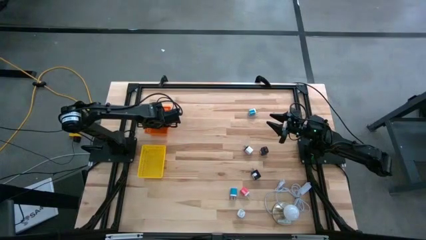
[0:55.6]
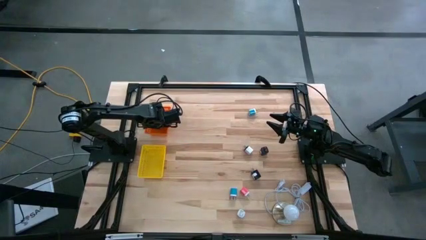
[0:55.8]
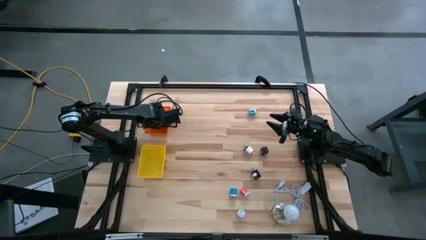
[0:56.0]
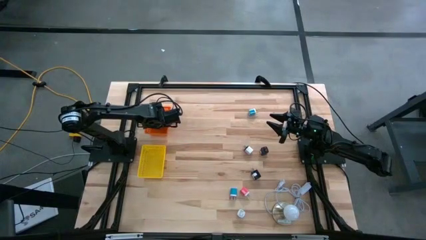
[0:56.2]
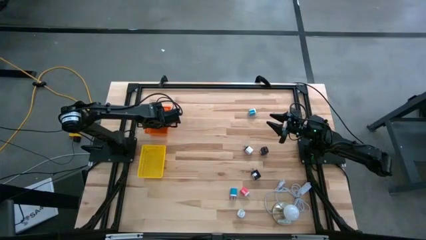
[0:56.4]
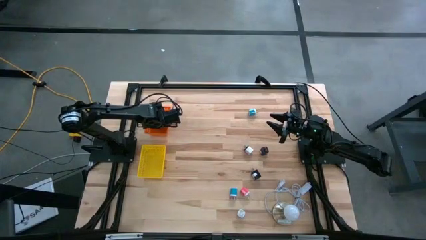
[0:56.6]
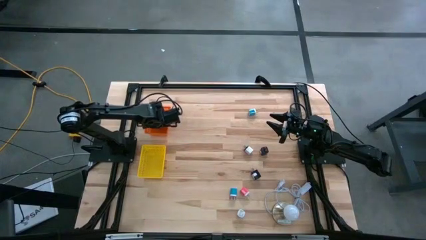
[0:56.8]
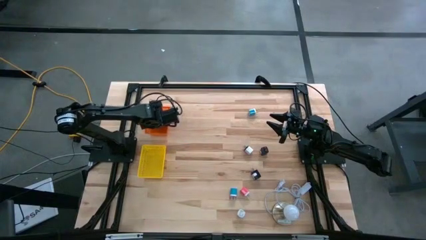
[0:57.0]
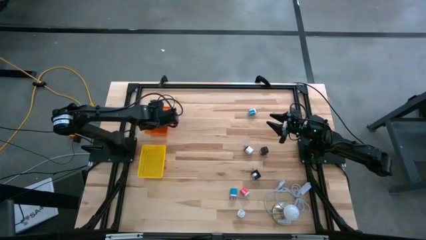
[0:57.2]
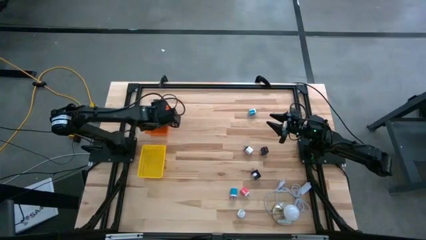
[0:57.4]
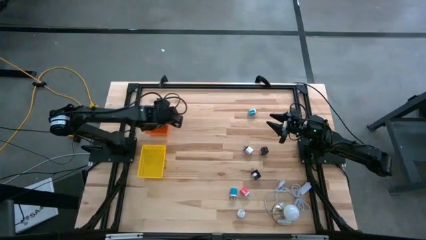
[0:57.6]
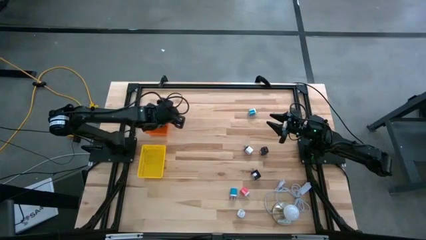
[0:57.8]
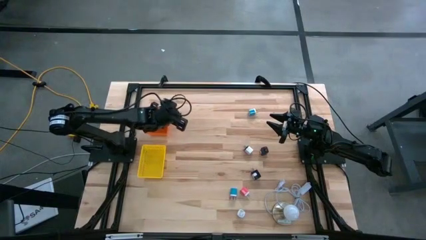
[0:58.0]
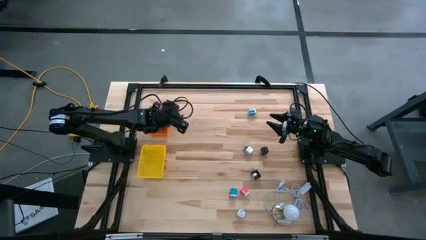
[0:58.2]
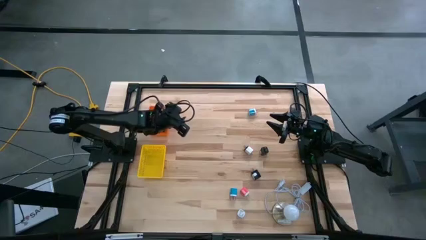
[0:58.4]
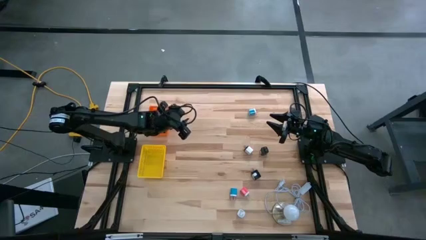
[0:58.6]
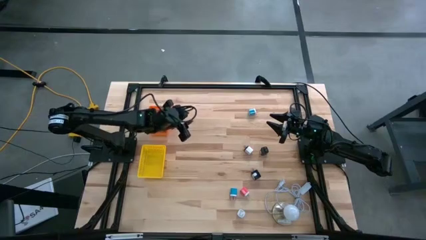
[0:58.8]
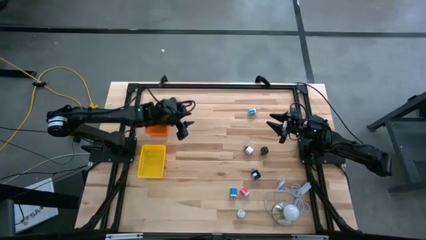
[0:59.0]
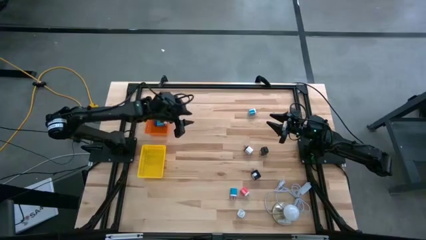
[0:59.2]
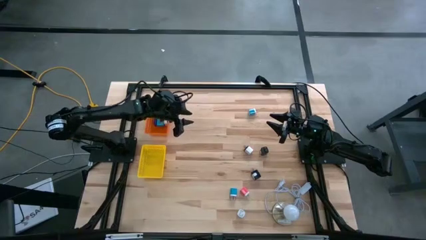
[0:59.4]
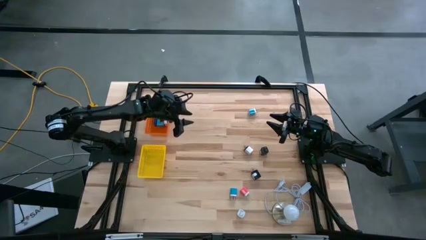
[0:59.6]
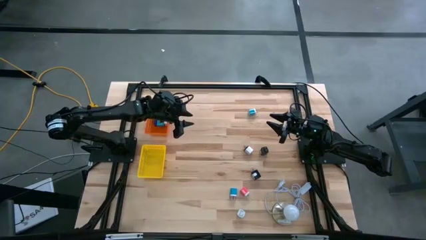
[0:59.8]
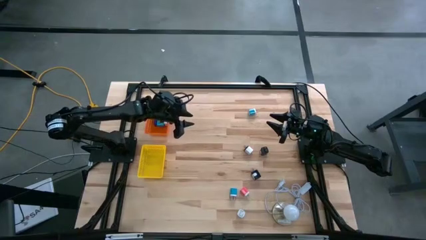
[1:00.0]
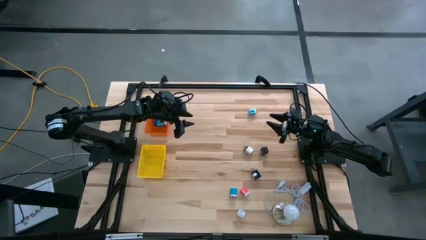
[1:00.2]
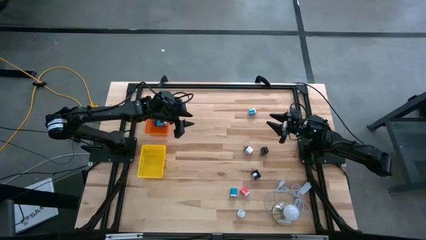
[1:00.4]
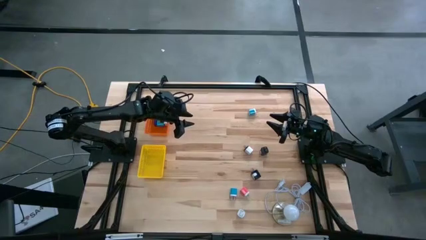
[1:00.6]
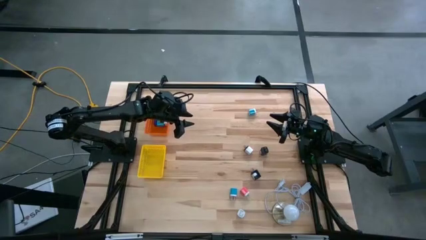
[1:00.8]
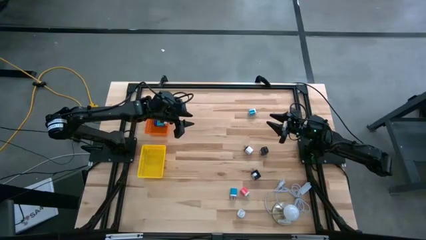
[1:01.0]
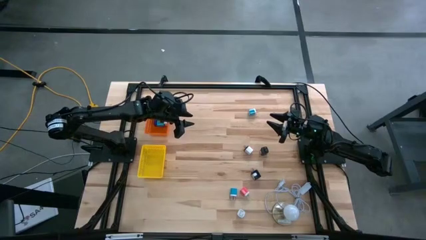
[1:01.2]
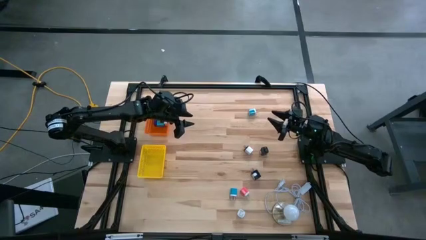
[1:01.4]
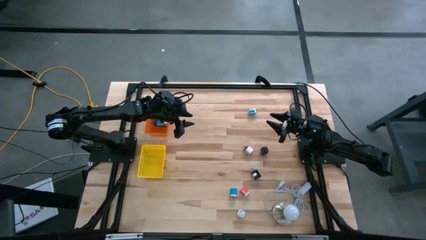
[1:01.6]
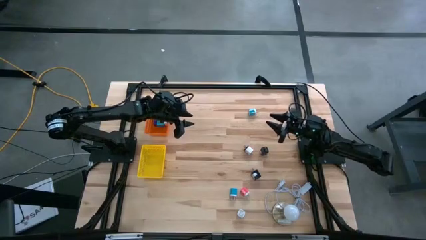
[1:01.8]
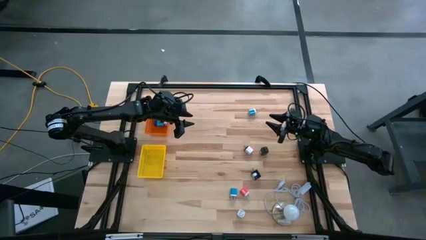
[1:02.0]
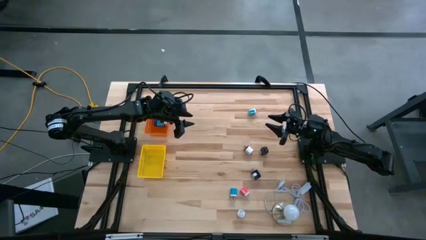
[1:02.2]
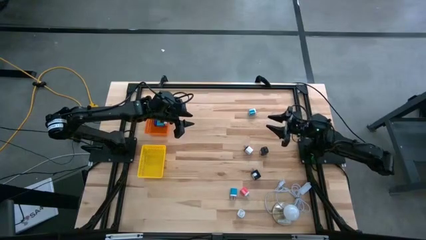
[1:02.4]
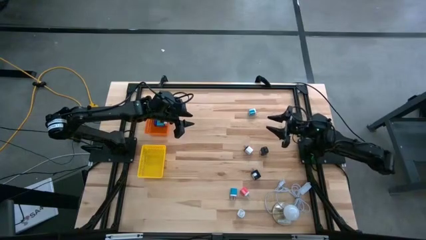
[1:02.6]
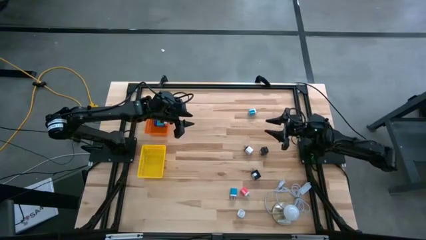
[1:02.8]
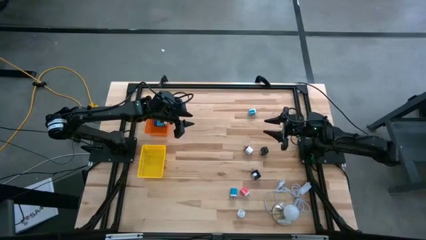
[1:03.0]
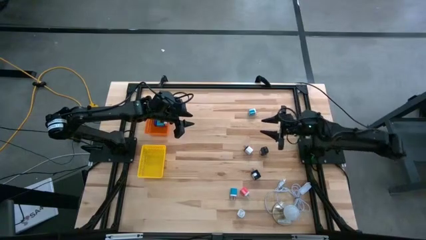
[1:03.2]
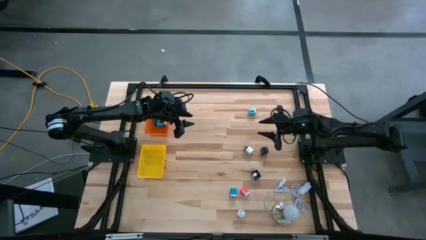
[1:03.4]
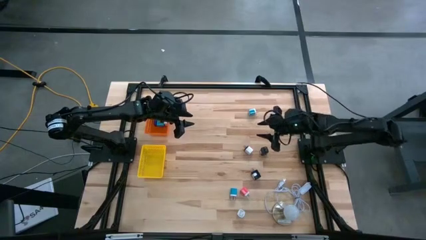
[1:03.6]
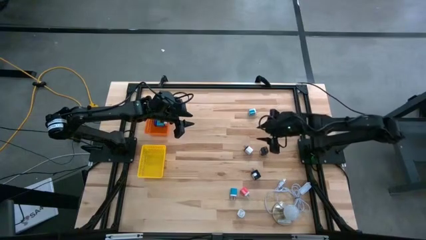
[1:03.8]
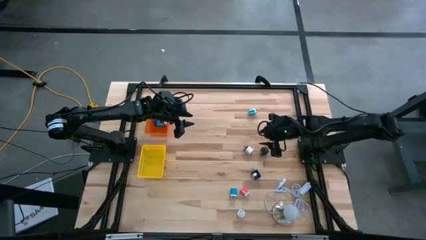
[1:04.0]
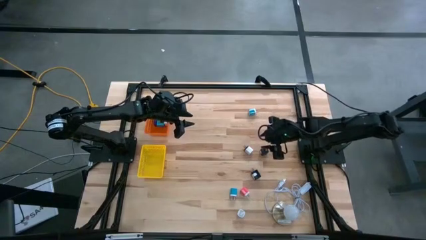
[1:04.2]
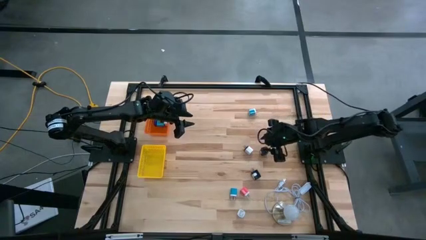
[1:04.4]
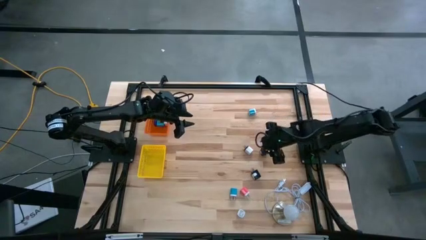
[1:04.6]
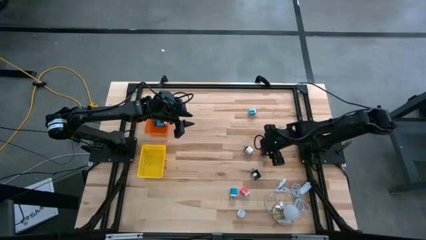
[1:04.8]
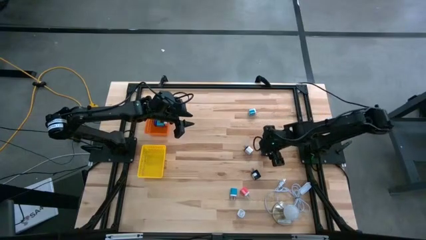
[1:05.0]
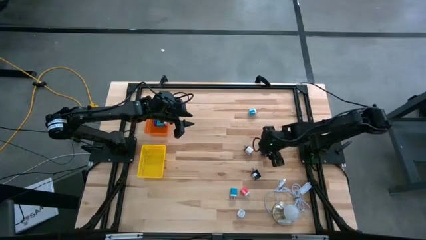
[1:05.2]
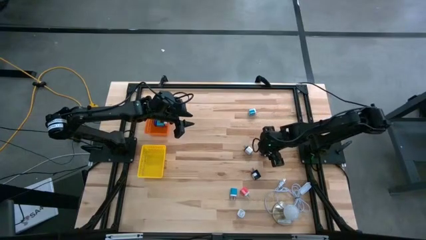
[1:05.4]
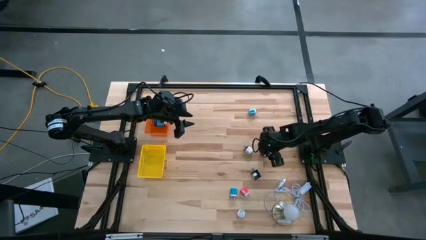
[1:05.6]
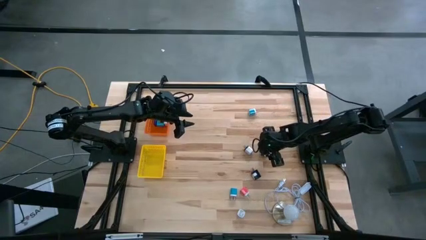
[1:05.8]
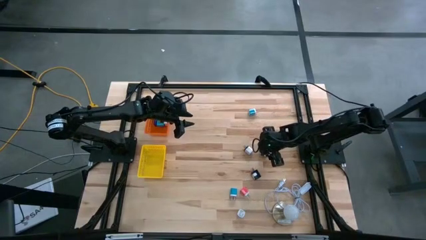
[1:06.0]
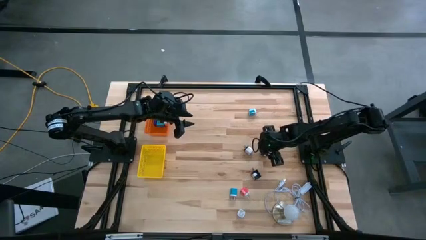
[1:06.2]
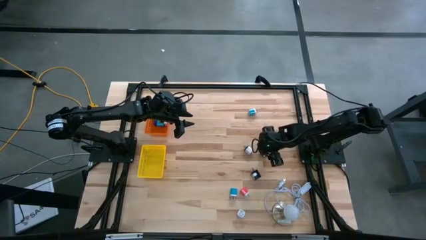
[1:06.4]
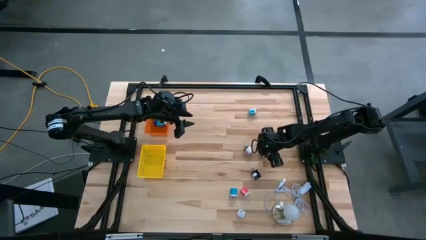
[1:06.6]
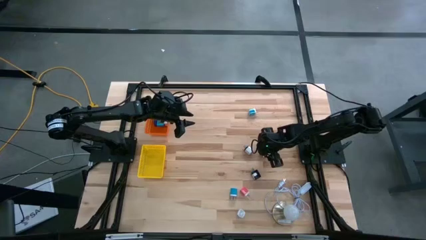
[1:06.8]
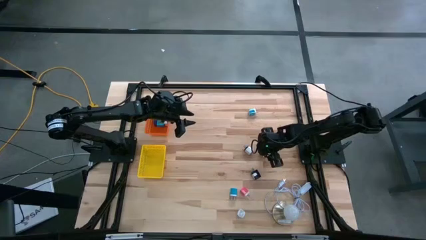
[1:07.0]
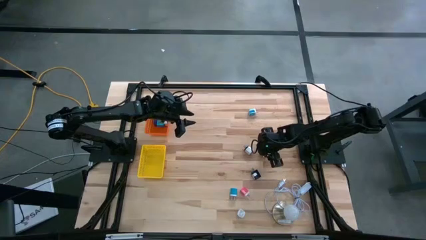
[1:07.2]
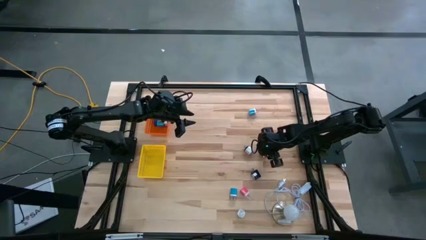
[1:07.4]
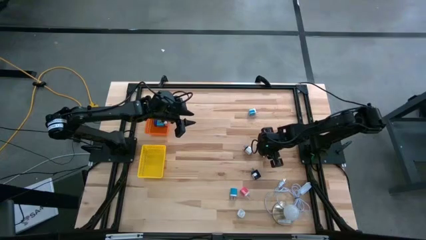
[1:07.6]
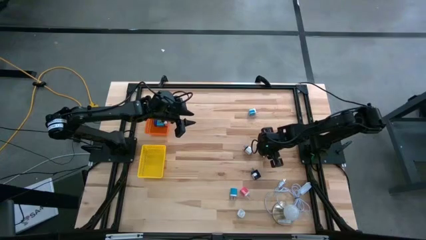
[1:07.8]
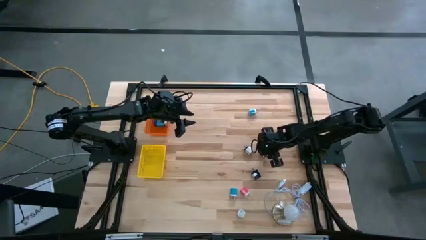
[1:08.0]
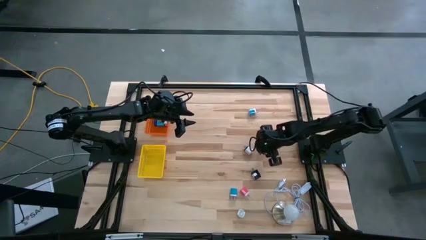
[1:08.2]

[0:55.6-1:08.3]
Task: Pick & Place Office items
Put the top black charger adapter into the yellow basket

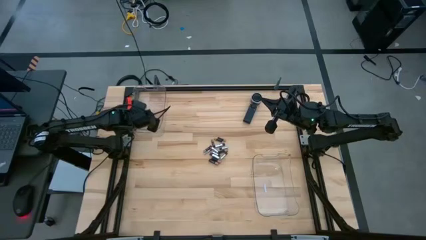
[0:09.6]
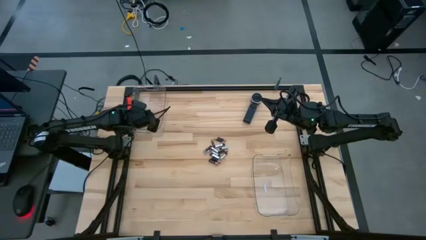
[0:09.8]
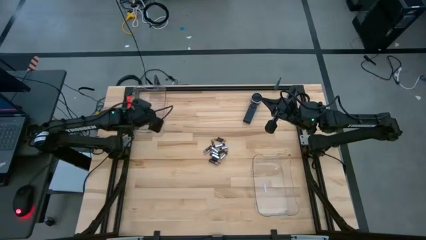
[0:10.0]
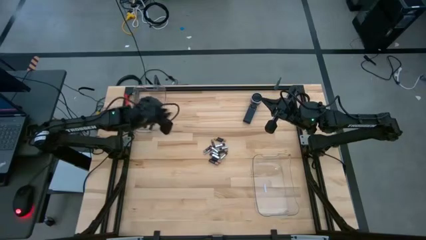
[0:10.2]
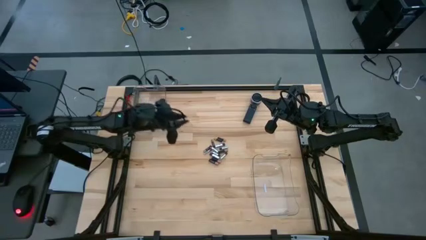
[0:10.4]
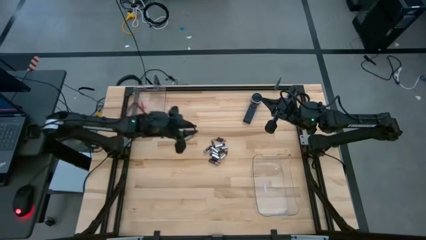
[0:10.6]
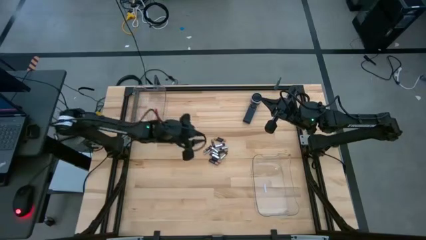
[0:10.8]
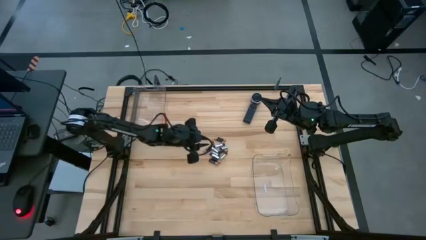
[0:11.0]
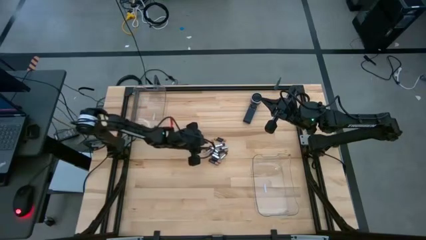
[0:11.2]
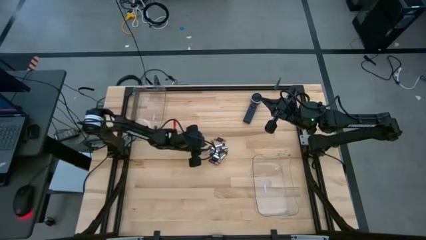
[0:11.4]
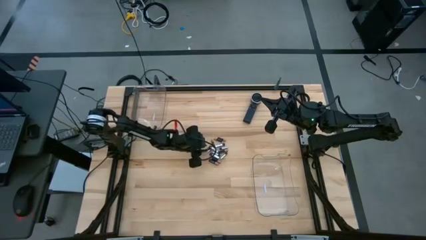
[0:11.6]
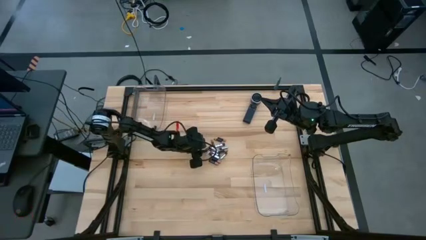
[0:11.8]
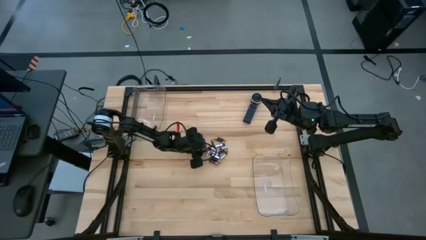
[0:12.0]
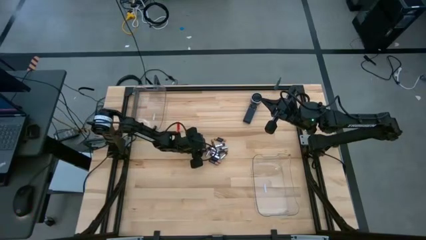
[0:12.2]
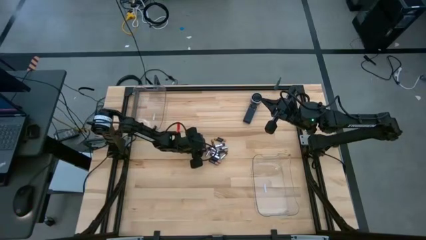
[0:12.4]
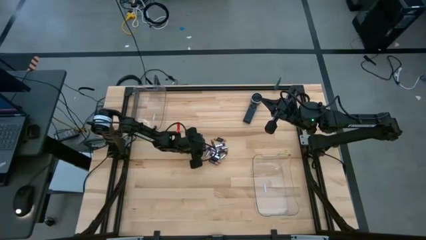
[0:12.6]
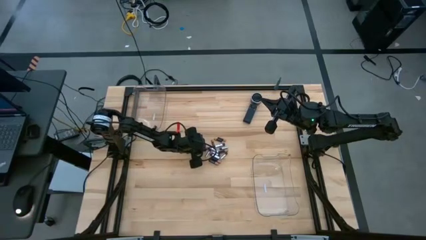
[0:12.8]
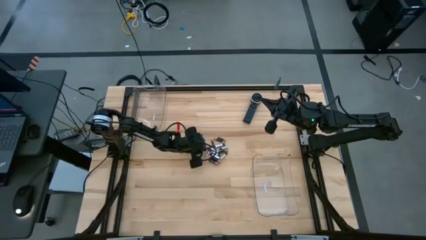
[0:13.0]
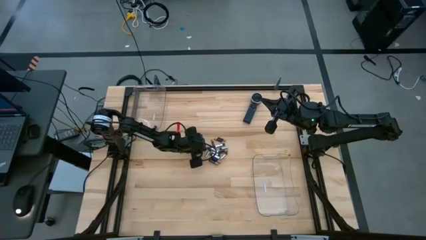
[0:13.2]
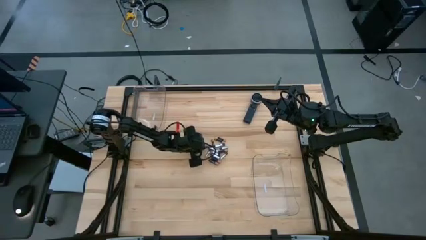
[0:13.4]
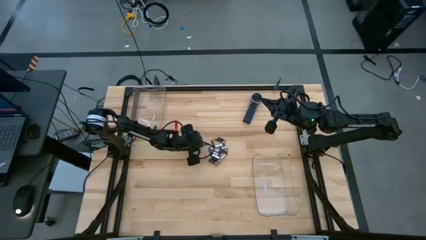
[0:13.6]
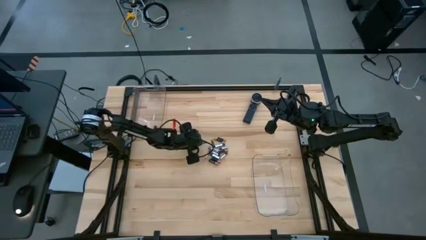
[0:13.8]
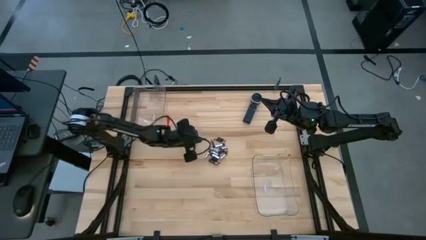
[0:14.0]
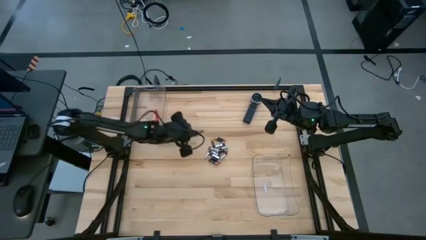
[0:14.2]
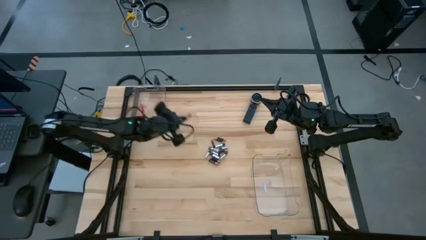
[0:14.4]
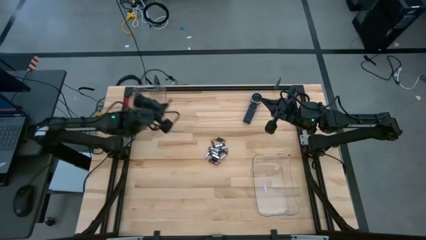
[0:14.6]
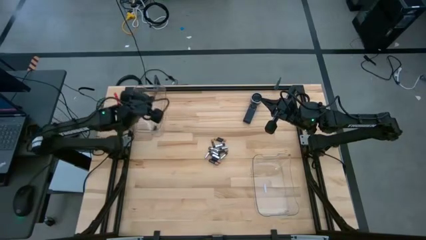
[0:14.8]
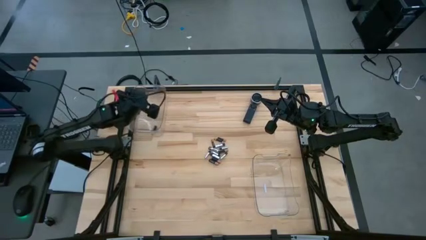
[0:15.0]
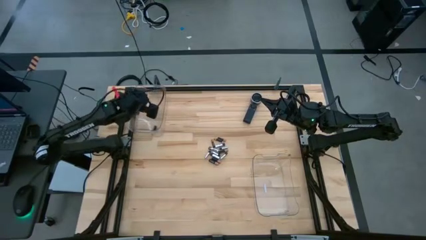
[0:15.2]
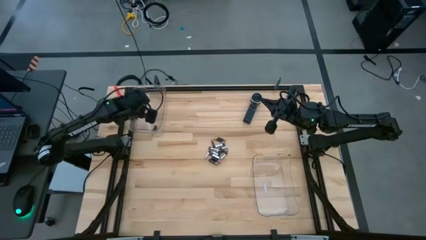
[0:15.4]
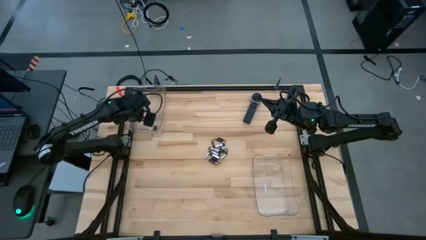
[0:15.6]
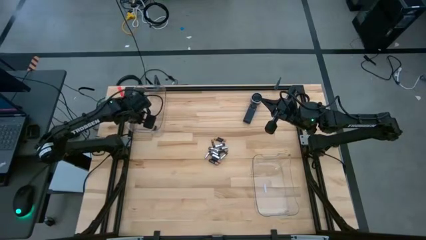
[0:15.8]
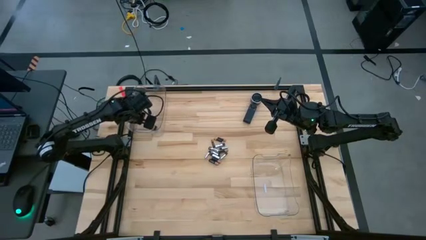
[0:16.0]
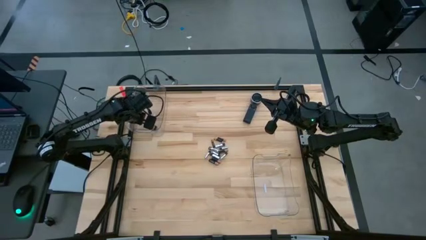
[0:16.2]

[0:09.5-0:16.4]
Task: Sort batteries
Put the black battery into the top transparent bin
